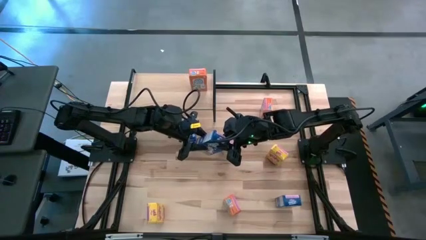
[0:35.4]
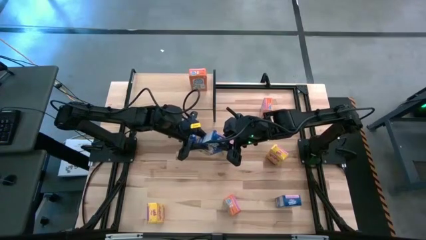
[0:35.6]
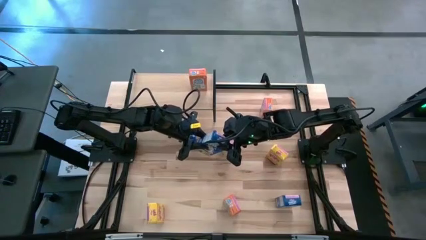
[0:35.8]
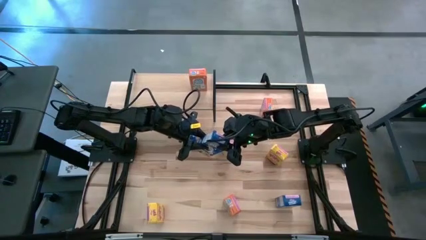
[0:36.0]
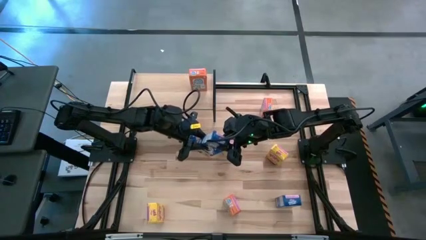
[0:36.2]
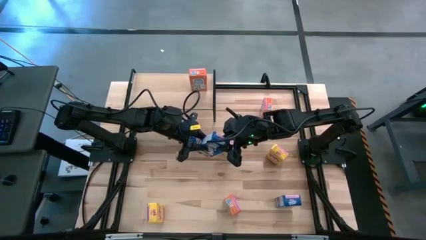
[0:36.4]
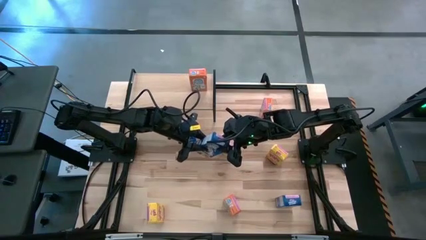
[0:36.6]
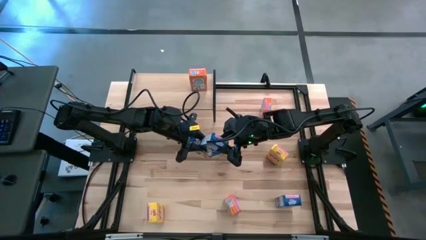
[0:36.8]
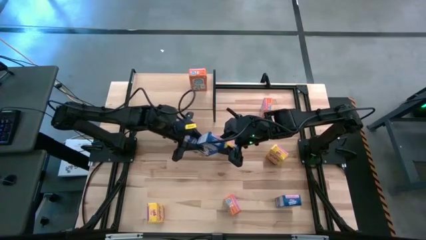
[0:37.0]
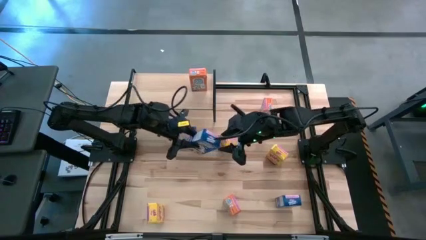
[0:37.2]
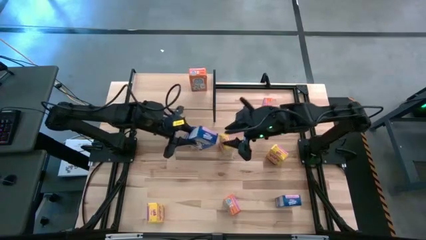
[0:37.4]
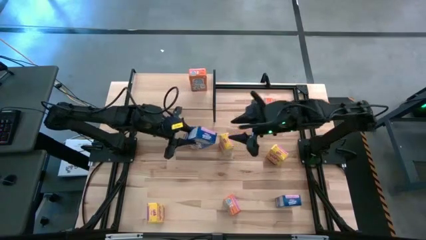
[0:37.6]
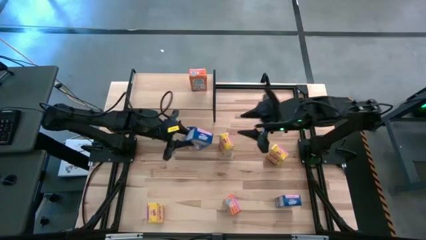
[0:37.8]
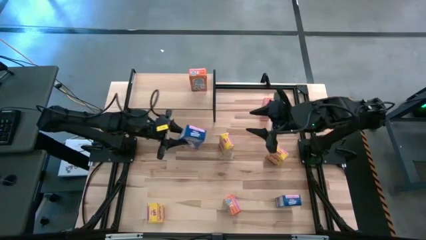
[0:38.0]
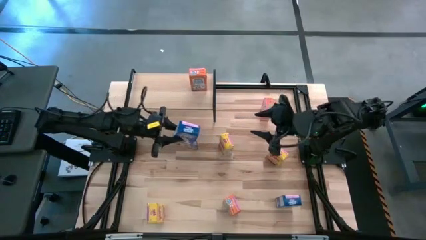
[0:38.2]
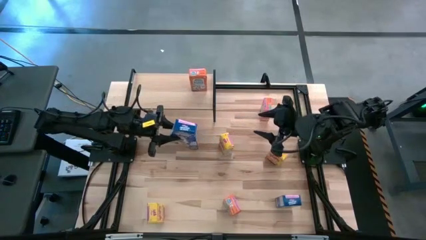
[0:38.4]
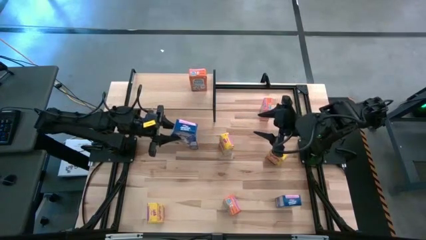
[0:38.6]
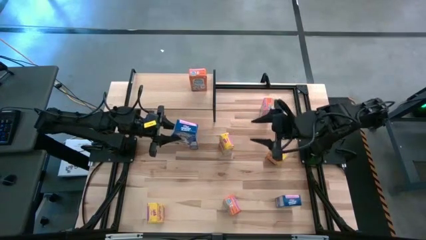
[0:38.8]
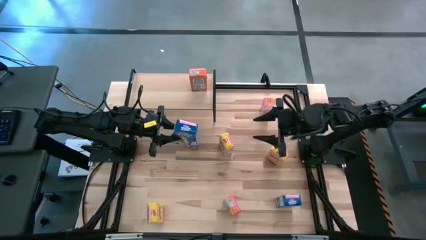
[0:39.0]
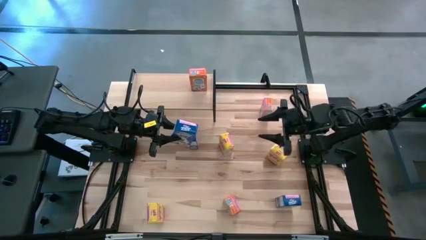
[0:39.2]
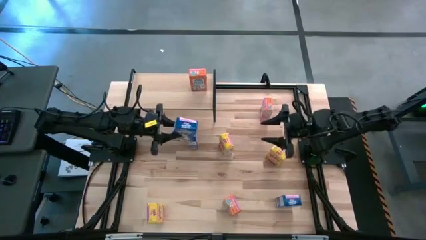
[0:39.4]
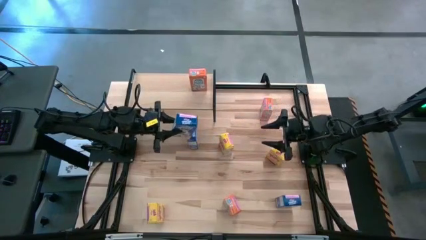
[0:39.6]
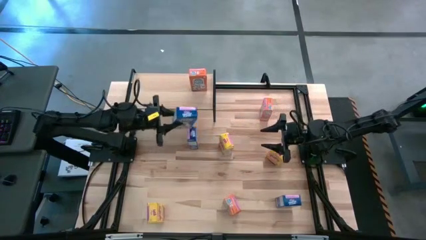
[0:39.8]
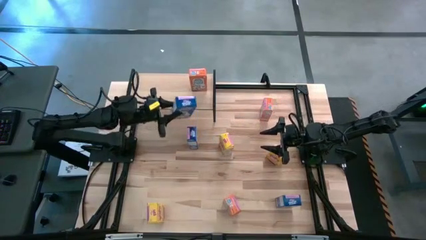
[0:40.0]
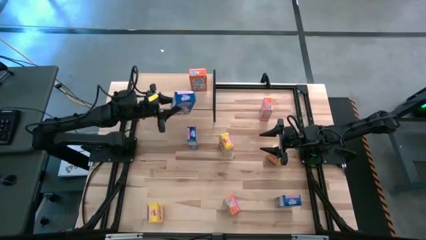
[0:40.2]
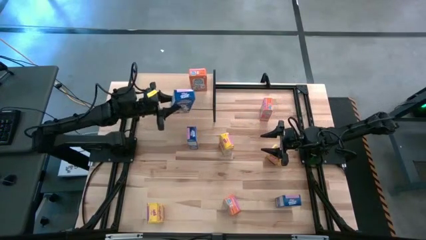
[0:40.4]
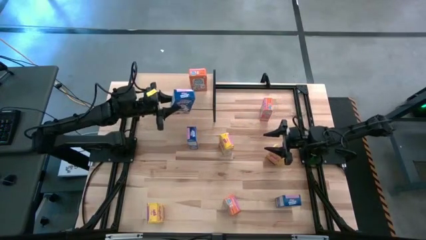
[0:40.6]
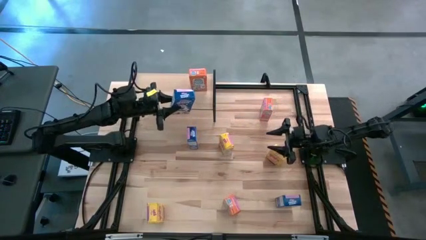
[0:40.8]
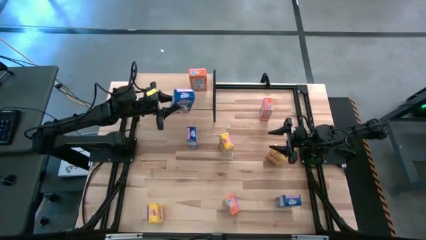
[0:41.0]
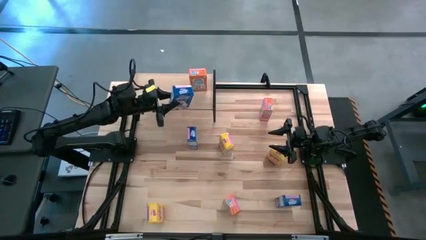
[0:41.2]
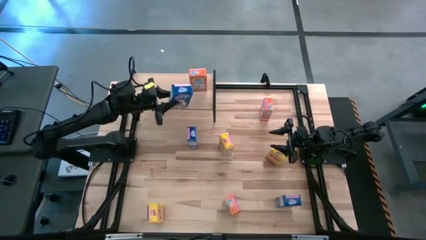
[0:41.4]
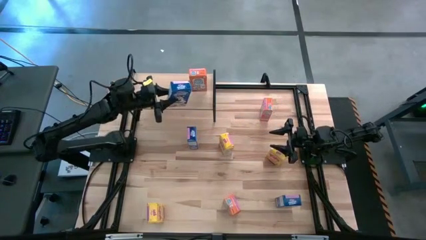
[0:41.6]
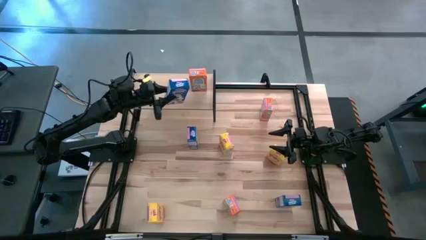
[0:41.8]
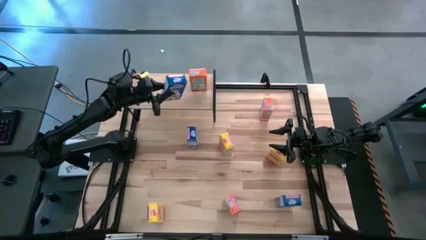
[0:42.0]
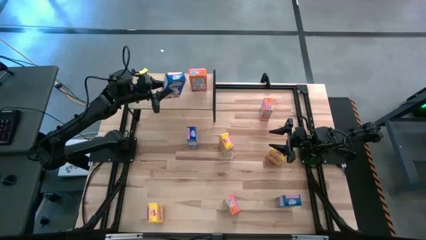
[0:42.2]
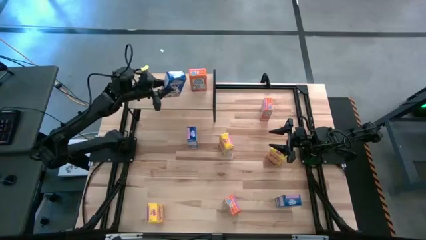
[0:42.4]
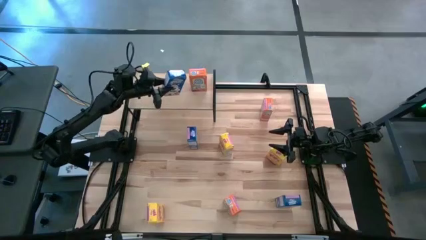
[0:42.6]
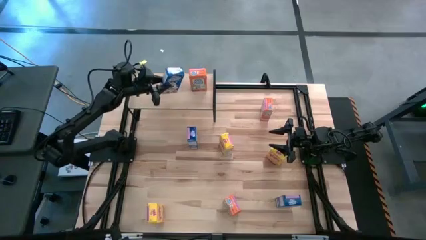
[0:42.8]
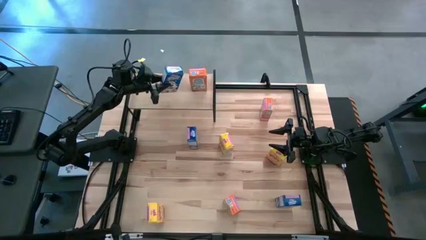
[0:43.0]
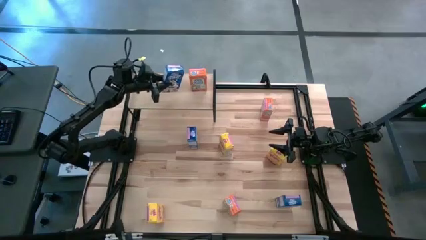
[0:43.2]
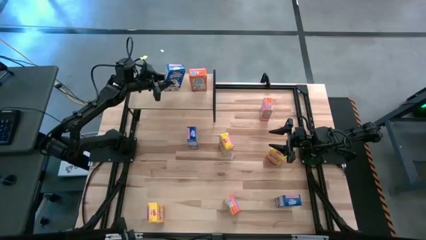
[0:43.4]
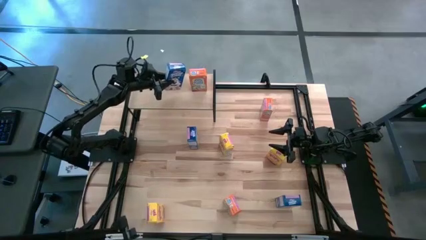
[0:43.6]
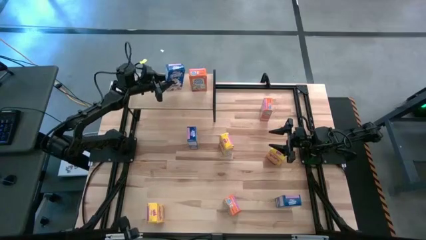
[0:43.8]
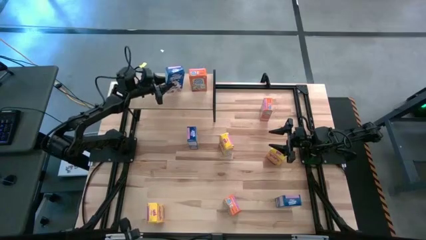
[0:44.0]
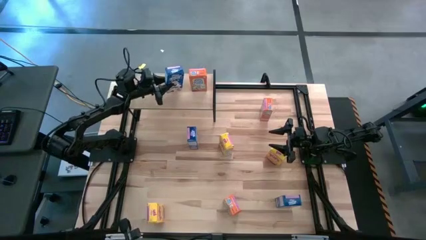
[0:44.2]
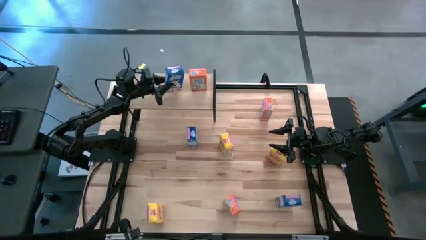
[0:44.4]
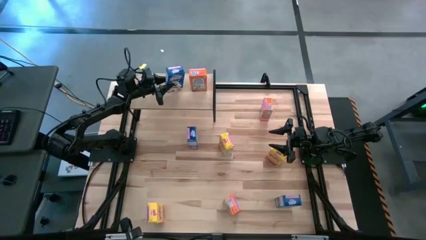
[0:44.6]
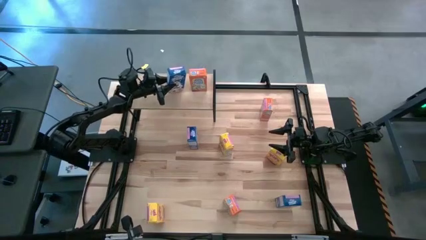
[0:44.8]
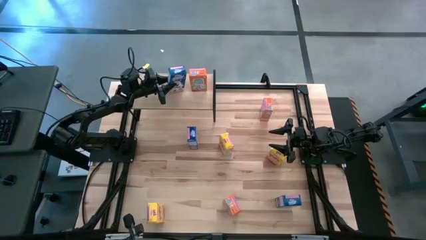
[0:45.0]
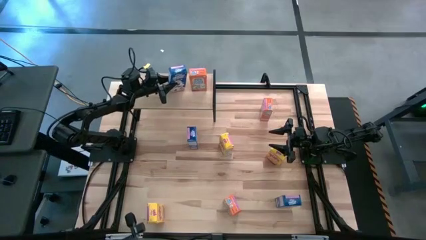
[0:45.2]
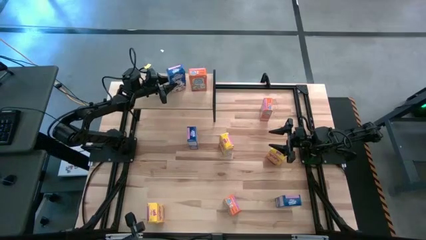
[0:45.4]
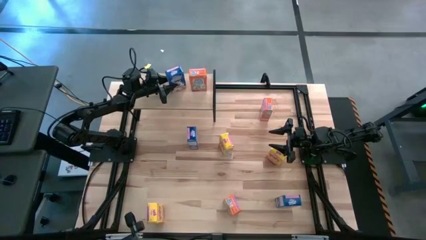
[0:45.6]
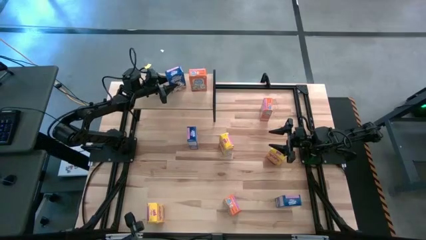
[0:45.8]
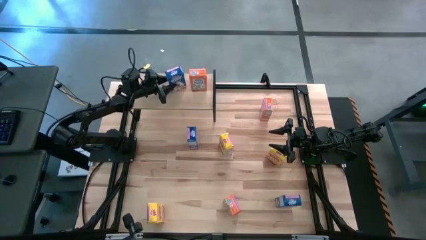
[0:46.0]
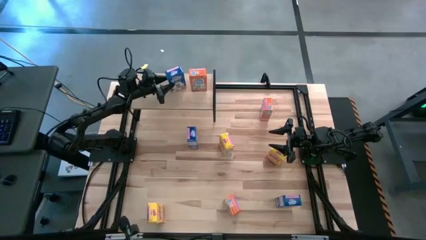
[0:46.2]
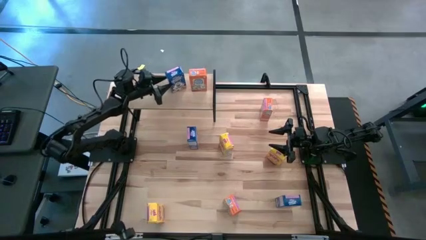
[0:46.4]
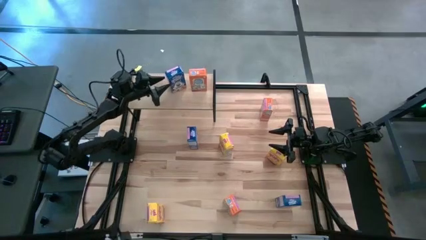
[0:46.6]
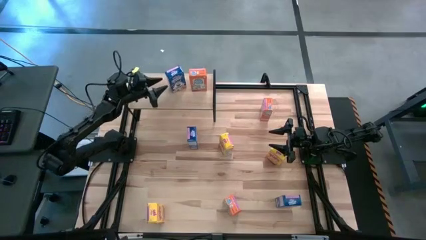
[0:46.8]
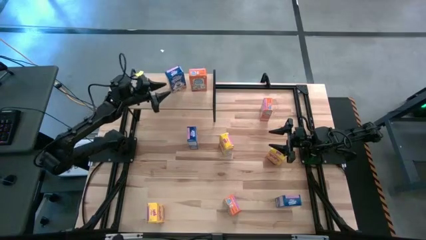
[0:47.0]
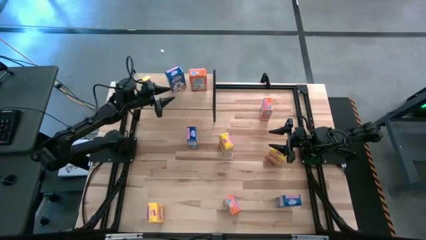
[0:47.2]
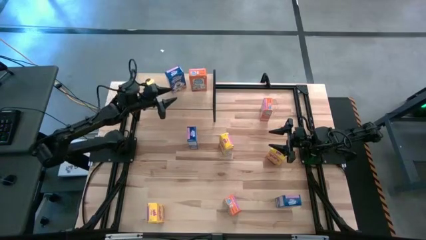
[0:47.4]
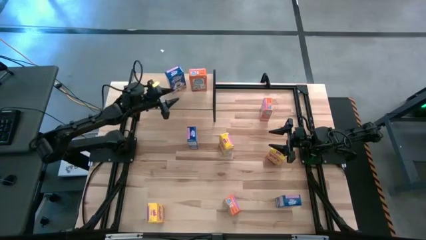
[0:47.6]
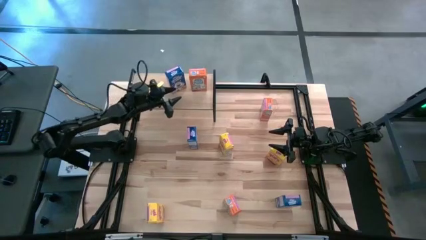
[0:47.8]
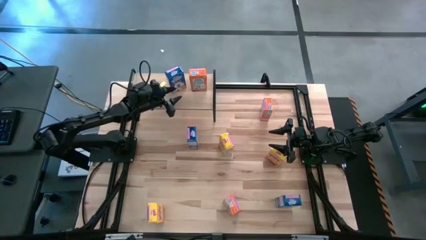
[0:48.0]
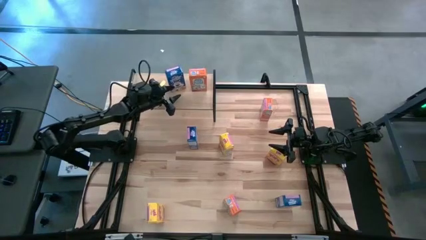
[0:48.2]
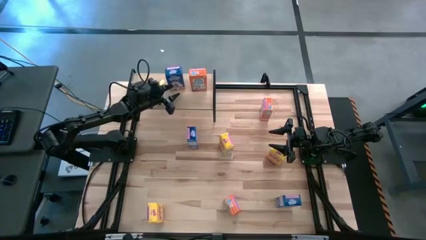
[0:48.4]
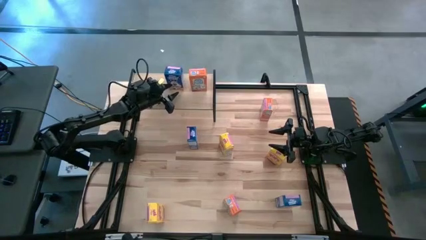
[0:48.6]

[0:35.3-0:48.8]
Task: Stack cereal on shelf
Put the middle blue cereal box on the shelf

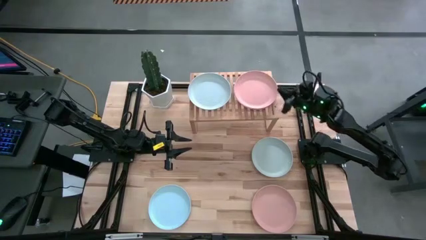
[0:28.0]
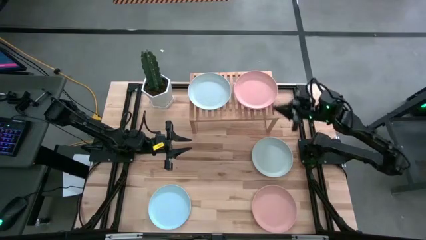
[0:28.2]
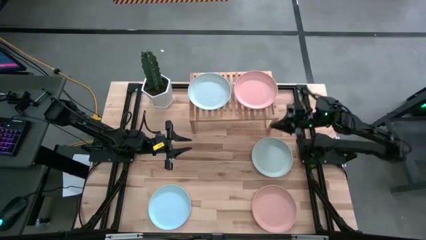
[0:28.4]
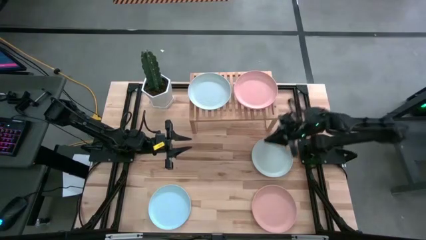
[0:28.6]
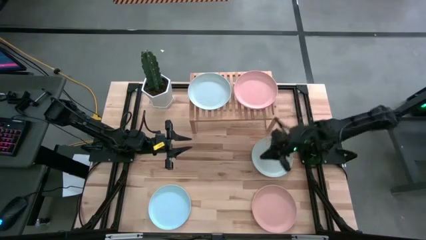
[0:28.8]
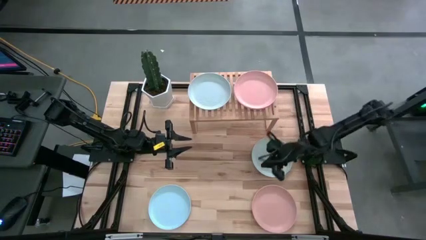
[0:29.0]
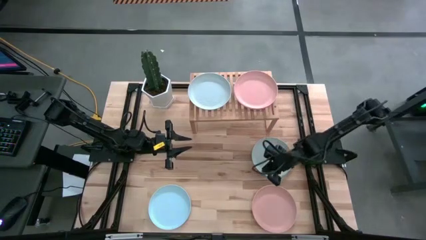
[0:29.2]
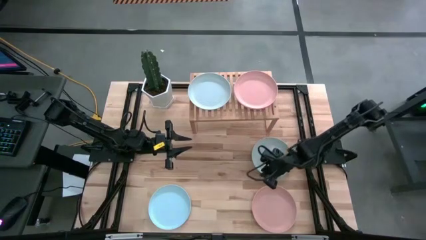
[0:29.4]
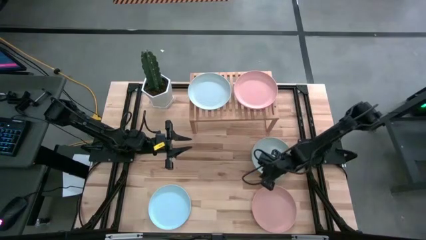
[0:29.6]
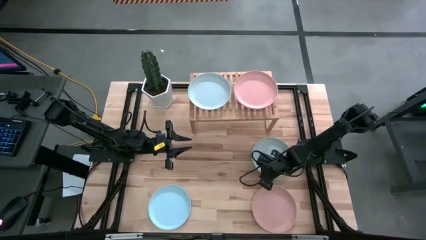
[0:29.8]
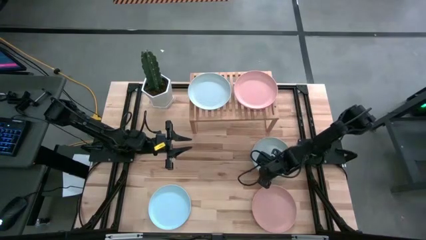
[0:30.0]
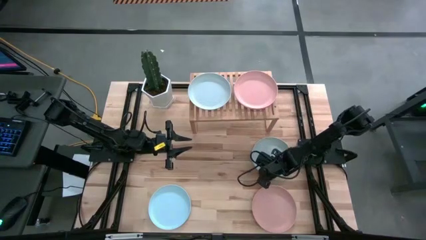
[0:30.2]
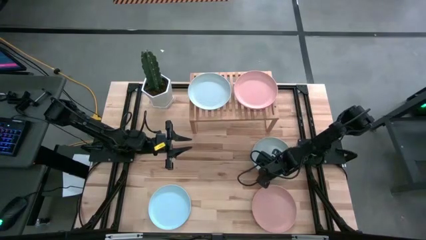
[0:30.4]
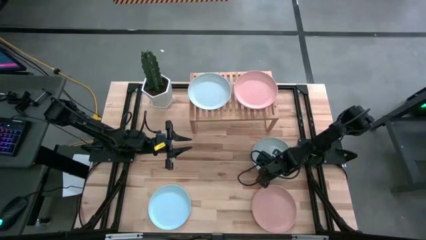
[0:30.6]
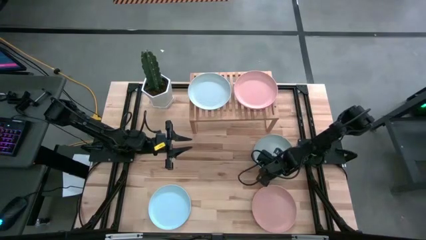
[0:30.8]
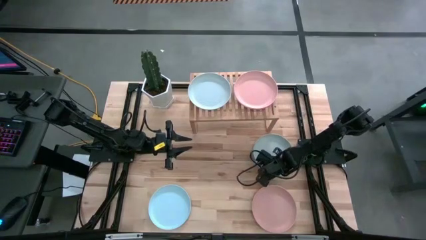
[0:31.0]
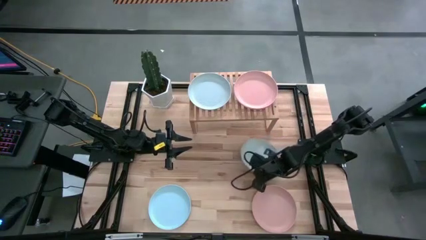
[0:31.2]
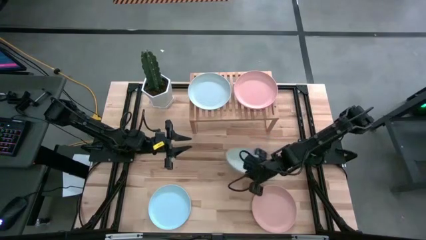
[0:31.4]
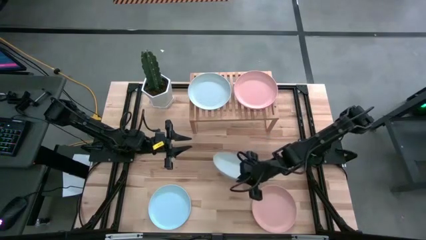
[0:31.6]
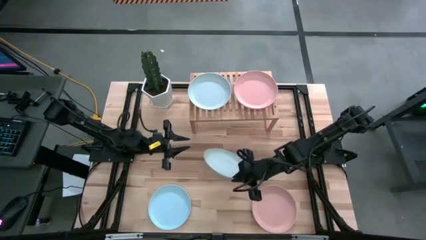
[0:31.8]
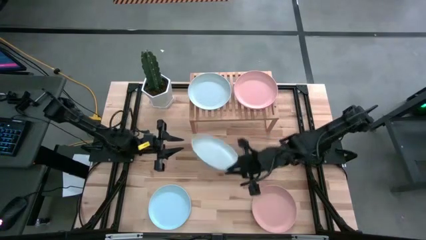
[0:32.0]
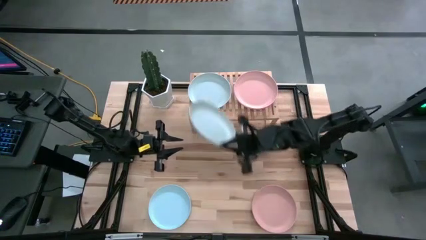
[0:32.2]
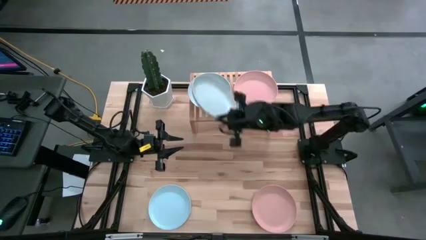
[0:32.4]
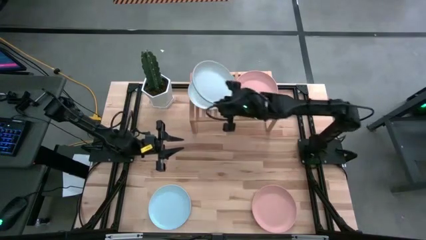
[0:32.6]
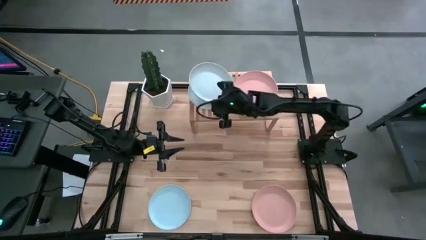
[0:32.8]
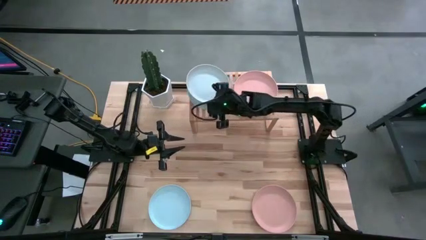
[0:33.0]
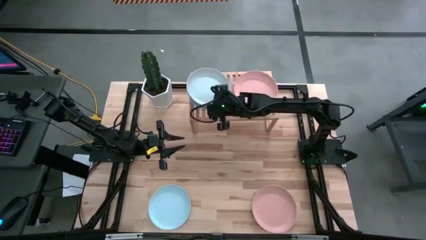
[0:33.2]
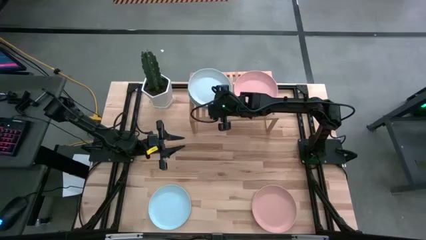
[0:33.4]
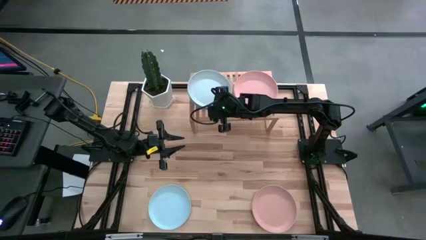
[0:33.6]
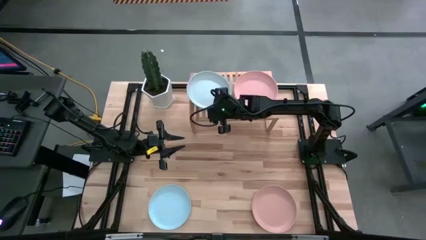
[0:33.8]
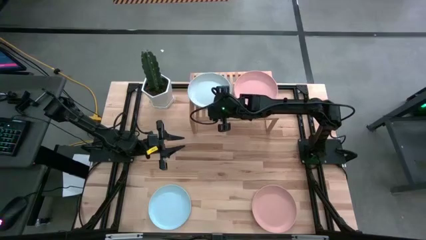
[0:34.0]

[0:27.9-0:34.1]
Task: Place and stack plates onto a shelf
Stack the light blue plate on top of the light blue plate on the shelf
